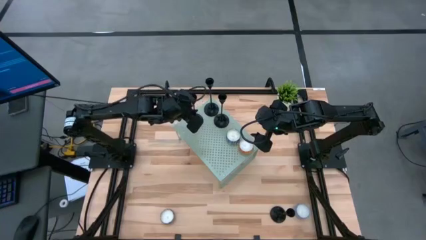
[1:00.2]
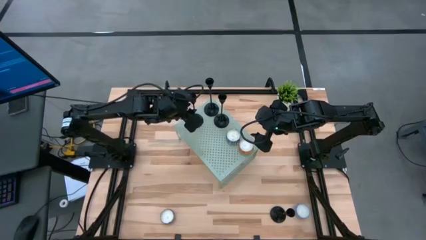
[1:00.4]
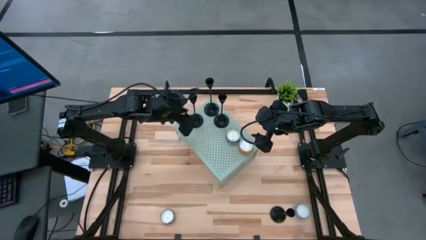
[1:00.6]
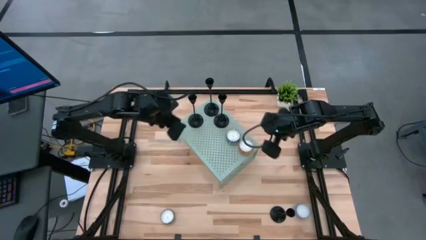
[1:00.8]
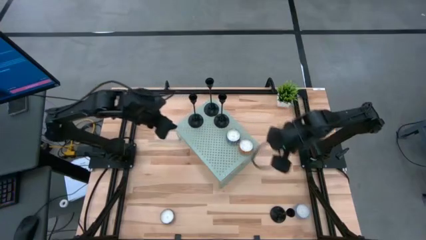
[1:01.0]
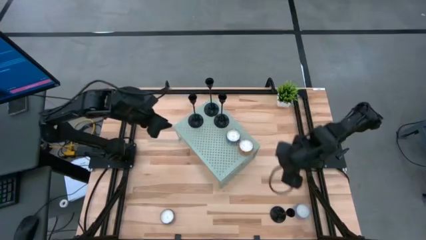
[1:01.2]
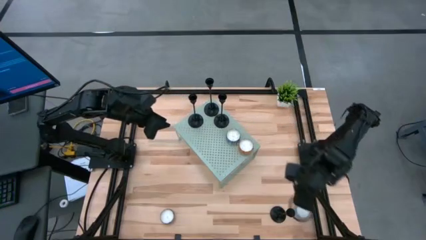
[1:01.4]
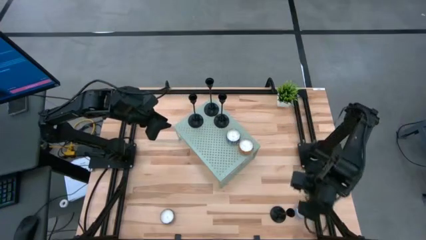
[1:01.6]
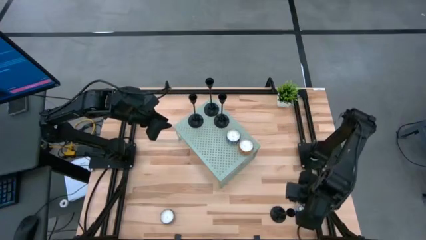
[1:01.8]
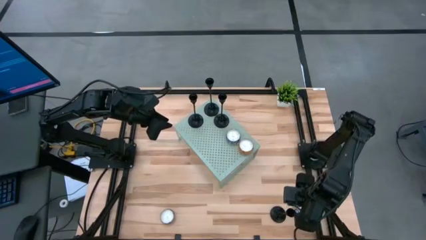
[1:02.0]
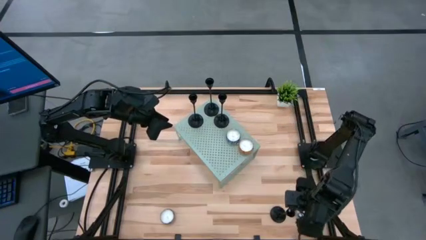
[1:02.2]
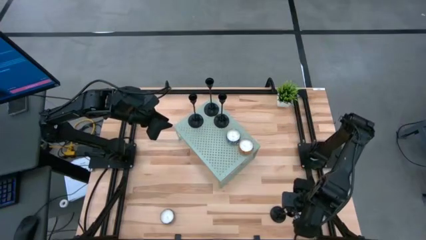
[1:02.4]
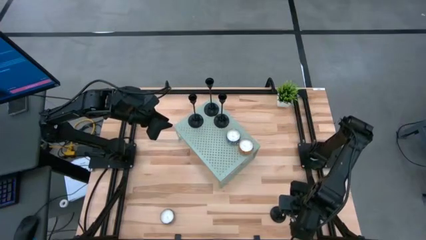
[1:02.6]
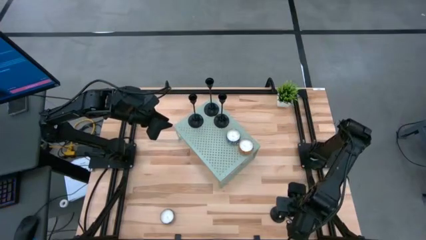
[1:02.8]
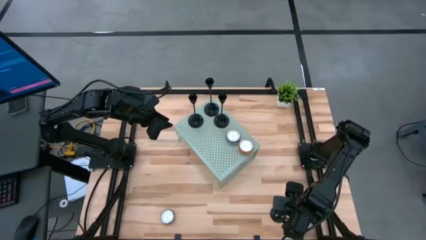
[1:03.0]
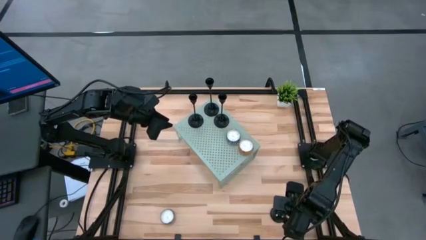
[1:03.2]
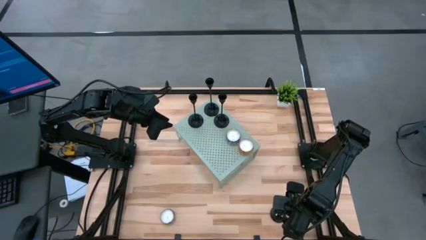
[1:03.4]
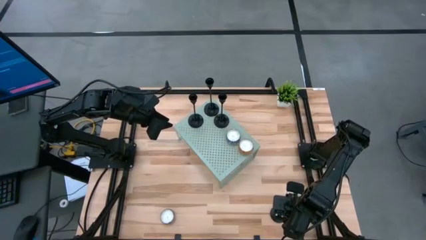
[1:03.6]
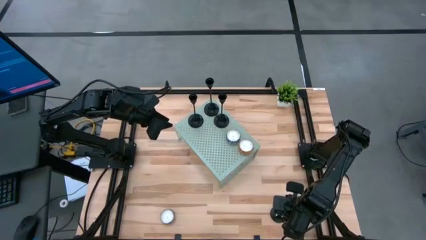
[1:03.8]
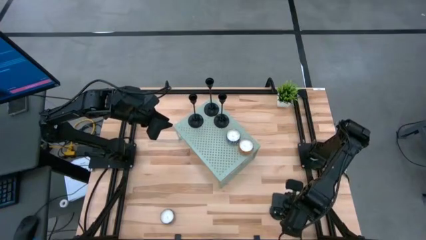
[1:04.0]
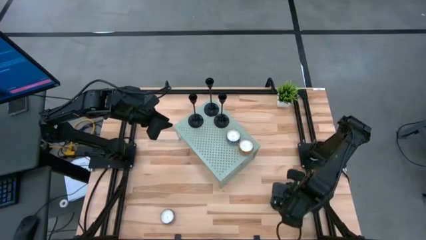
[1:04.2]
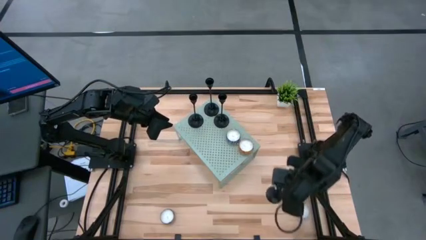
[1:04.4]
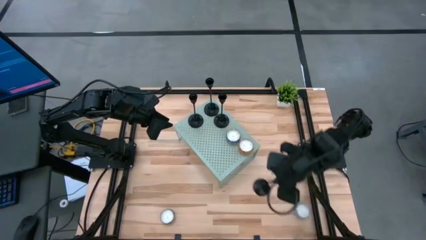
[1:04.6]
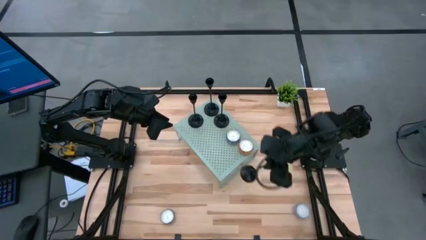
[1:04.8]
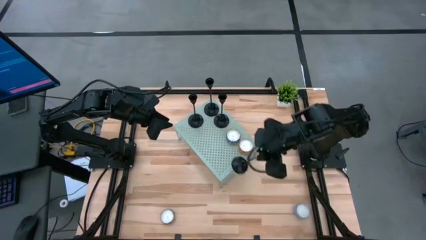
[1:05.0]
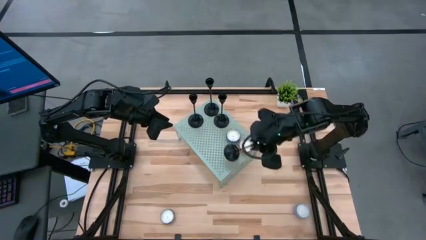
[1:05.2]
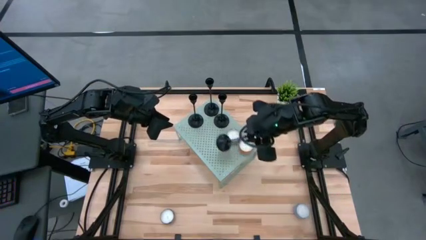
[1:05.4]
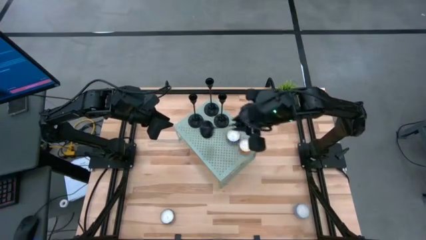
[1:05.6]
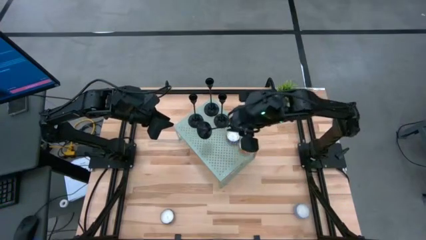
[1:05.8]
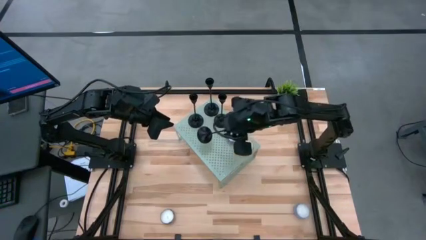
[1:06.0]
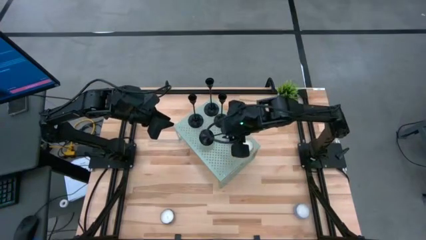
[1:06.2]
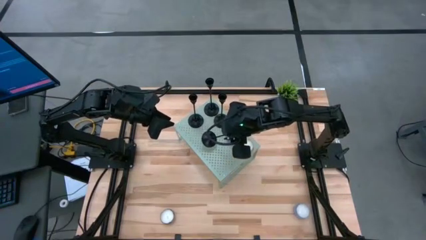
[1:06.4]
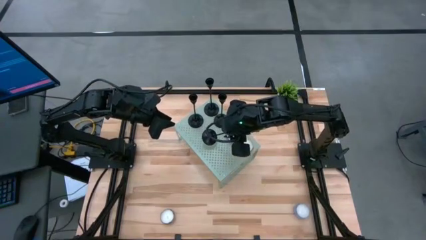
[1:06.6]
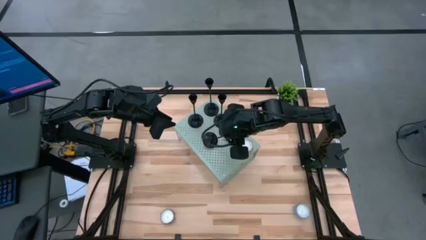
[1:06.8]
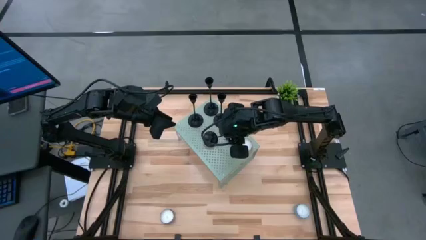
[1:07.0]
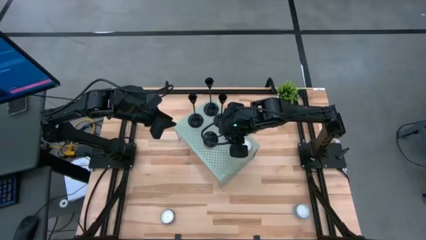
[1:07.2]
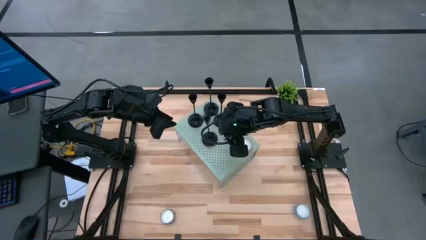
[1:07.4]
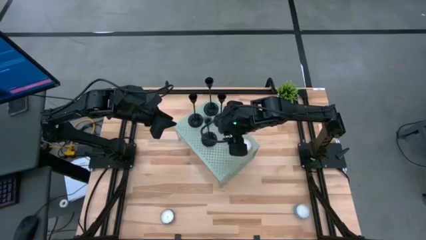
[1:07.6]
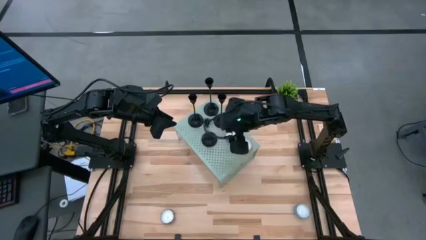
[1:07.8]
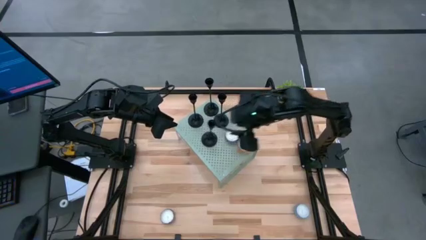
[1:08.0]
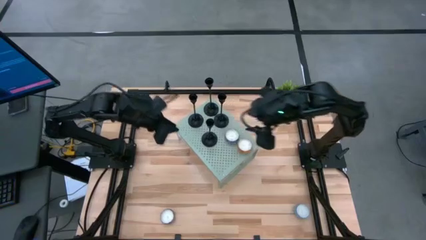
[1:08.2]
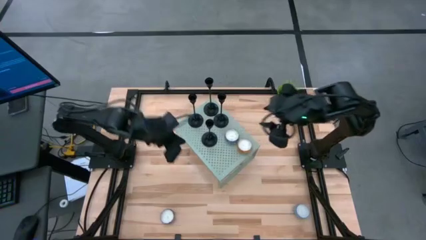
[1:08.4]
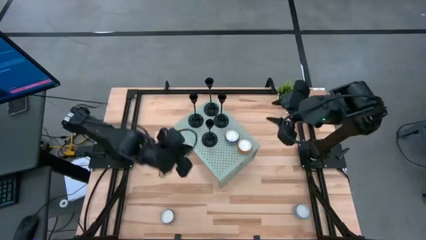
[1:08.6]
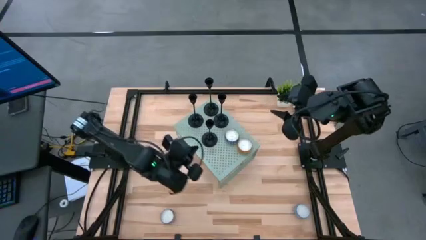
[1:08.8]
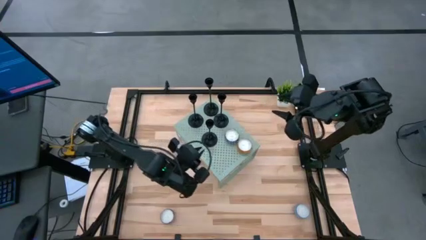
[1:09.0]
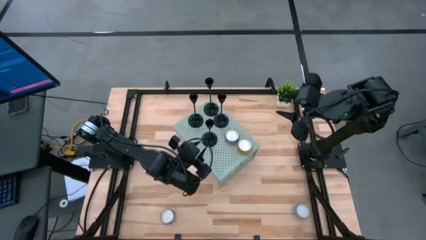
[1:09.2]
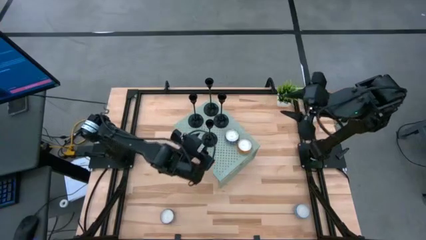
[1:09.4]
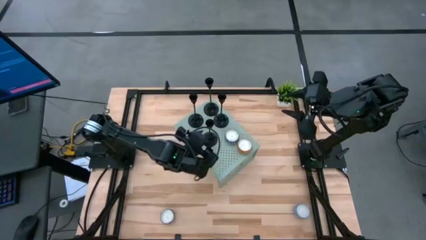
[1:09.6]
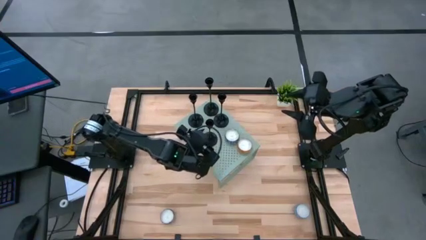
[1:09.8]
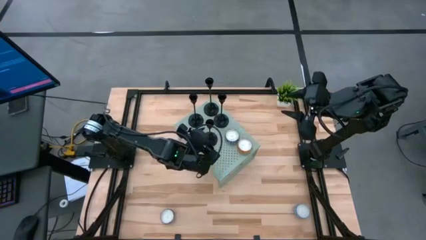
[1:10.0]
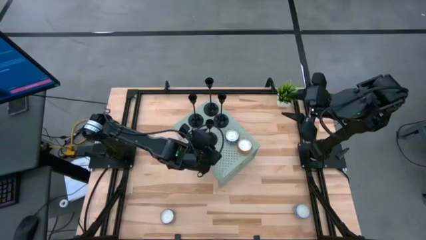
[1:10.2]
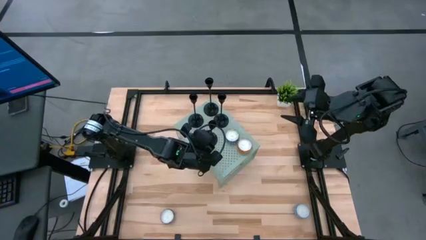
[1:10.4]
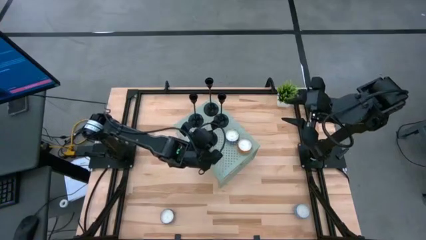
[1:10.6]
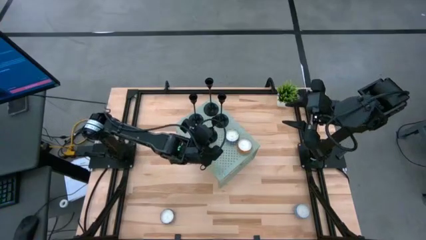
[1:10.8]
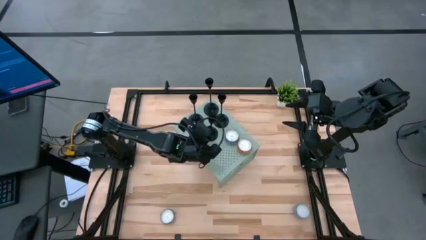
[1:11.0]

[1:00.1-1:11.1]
Task: Pick & Place candle stick holders
Put the black candle holder on the shelf

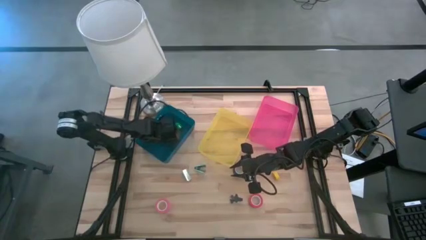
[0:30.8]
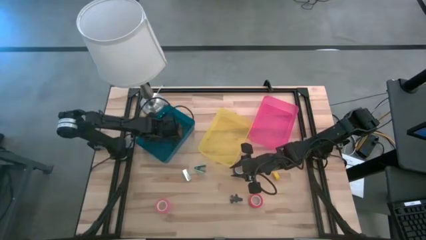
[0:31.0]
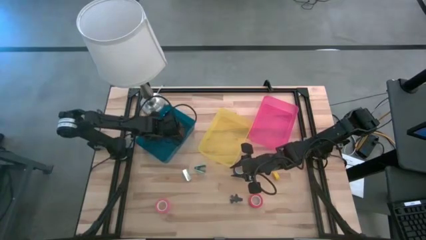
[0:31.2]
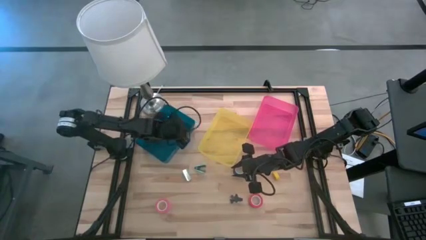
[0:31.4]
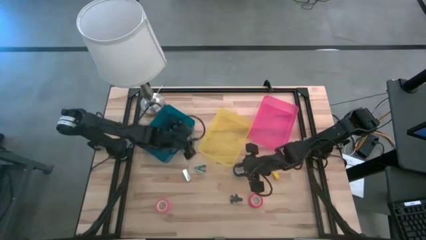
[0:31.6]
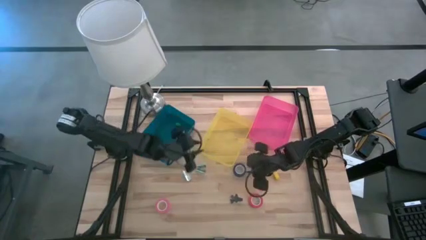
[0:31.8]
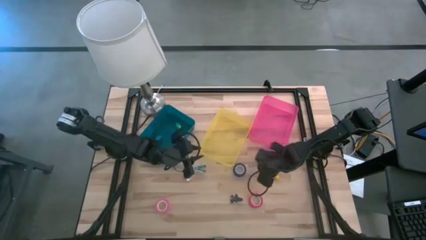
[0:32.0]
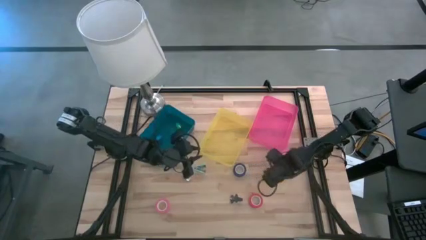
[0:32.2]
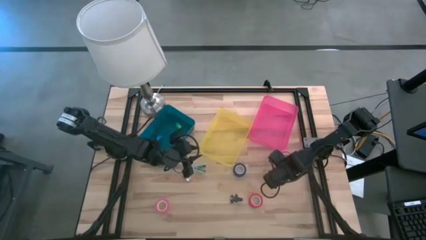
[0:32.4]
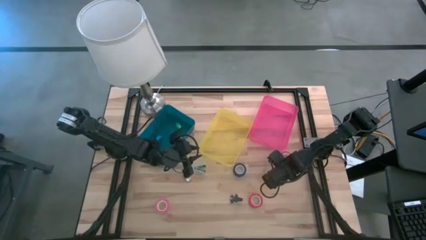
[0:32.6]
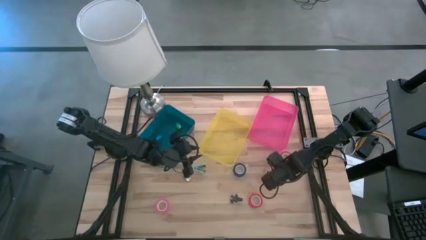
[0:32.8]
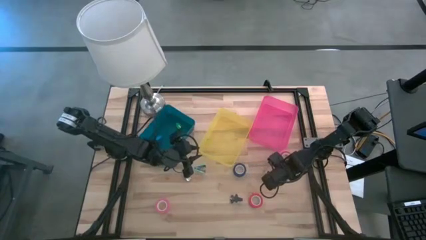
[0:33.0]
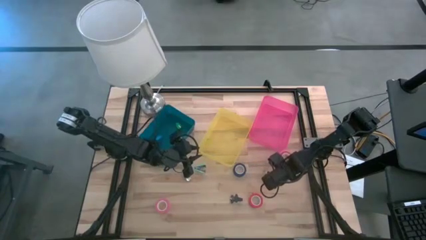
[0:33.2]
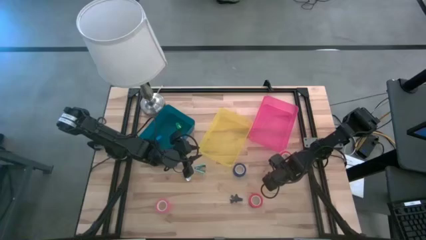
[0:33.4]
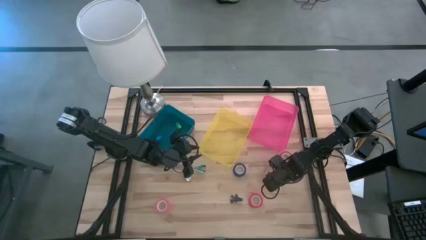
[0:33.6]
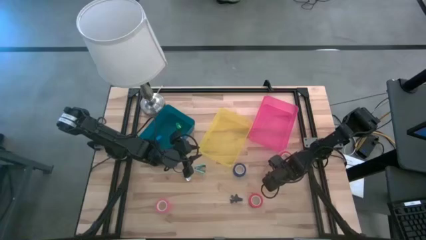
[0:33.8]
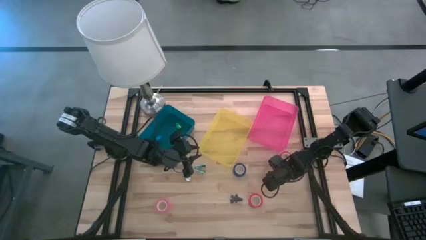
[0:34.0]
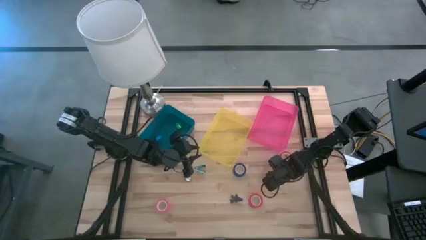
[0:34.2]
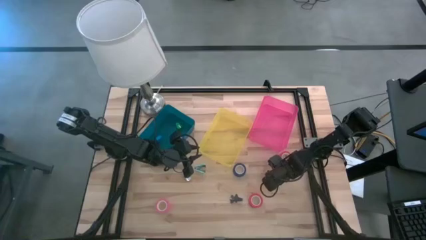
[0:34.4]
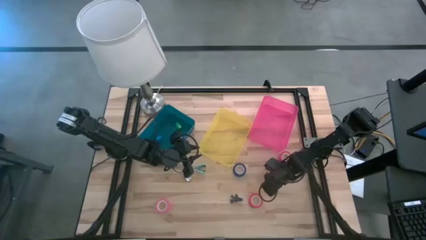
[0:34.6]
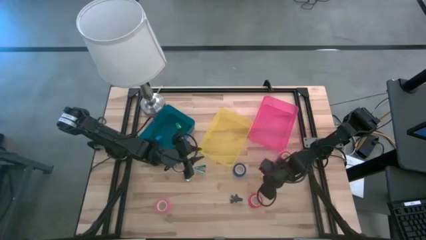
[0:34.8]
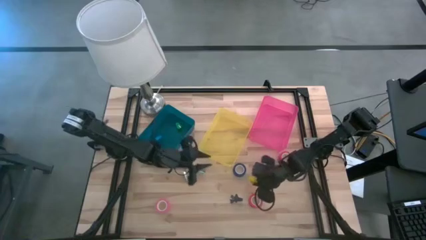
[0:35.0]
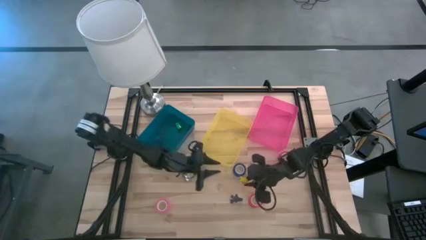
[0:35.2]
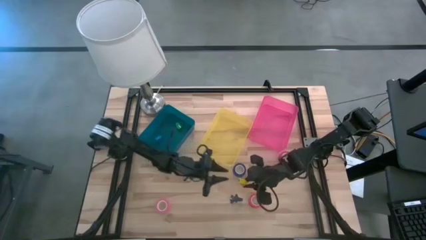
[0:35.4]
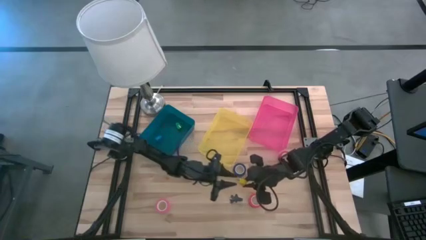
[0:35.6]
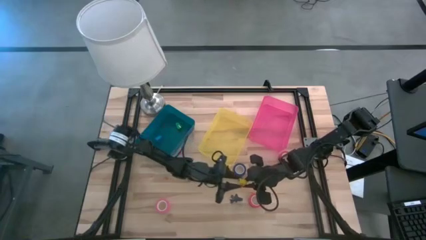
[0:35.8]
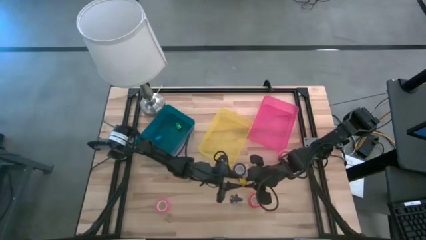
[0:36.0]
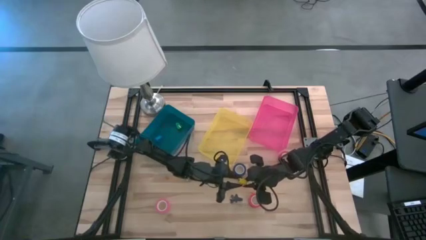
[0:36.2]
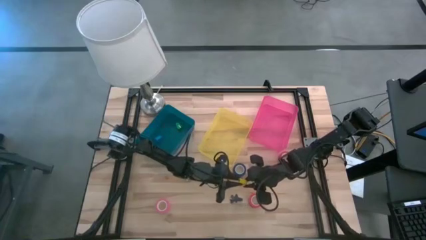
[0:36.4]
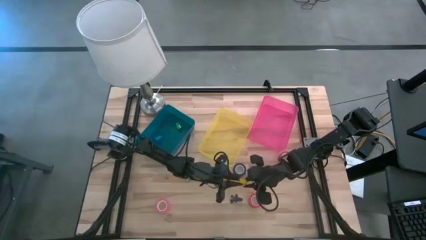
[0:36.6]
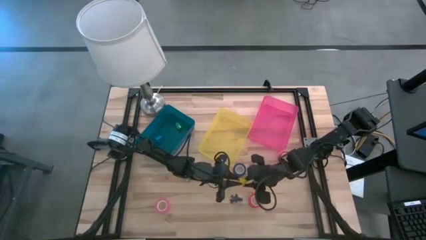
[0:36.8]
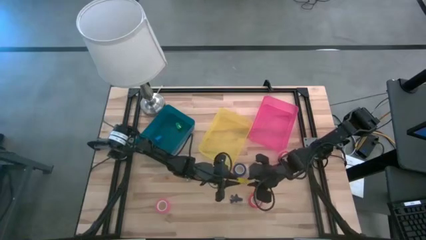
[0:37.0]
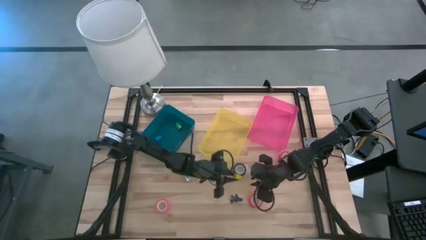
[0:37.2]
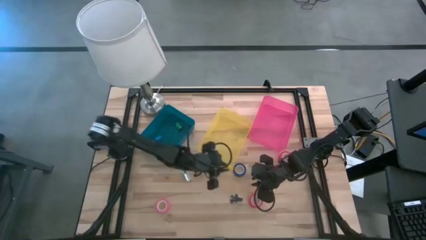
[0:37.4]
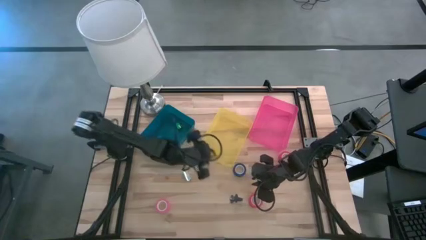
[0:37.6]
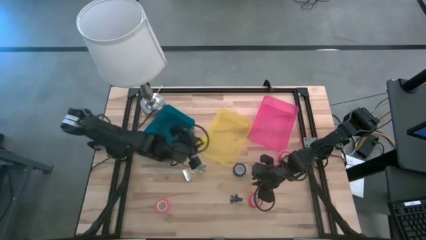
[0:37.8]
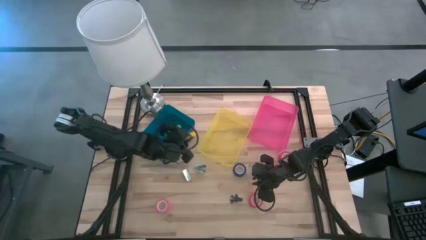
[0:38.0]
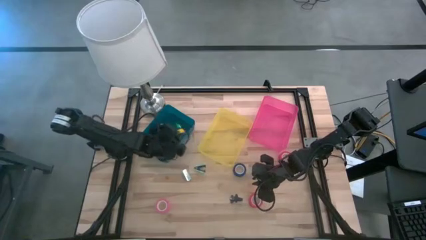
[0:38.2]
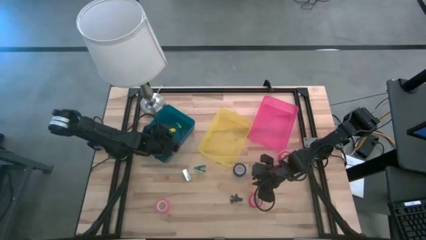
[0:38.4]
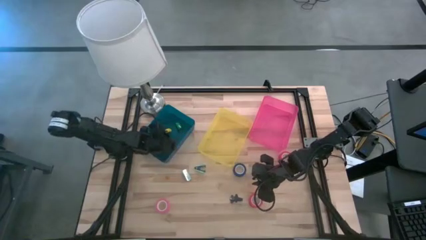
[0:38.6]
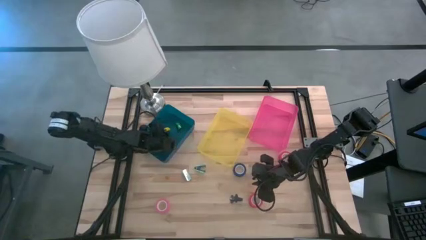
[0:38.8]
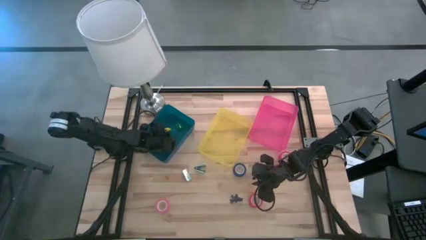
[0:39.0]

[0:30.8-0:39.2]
Task: Pick and place Stapler, Stapler remover, tape
Put the yellow stapler into the blue bin
